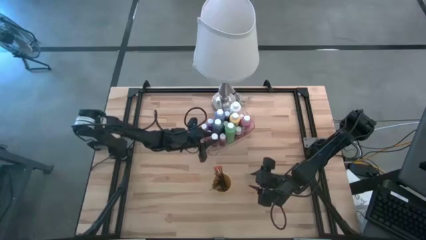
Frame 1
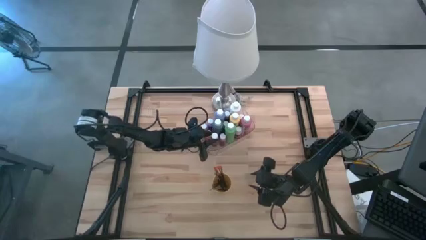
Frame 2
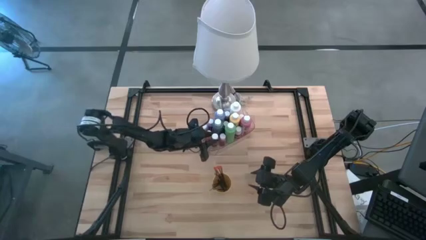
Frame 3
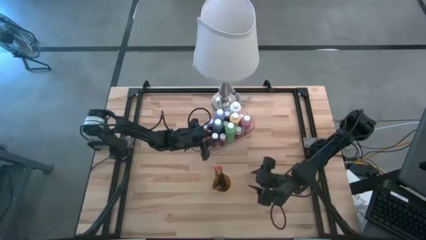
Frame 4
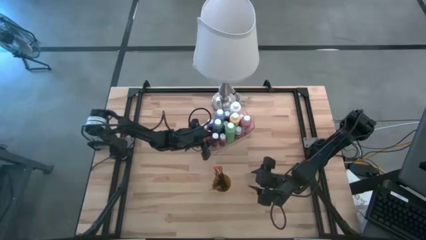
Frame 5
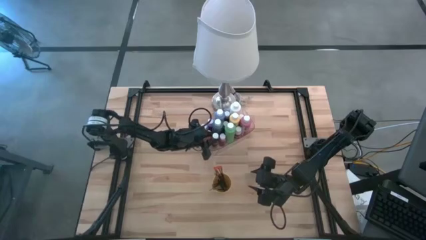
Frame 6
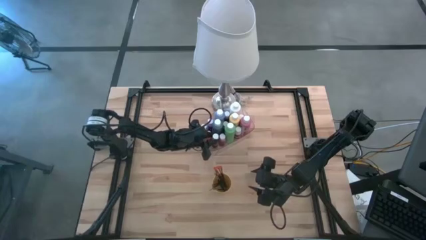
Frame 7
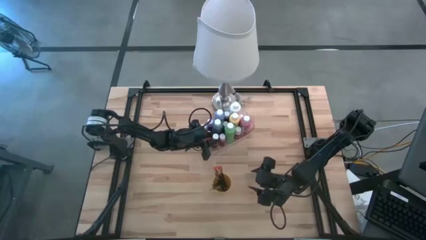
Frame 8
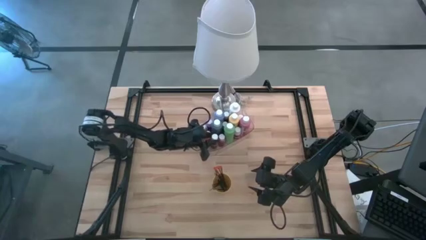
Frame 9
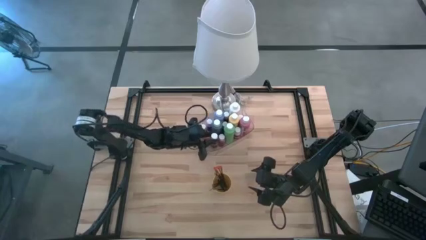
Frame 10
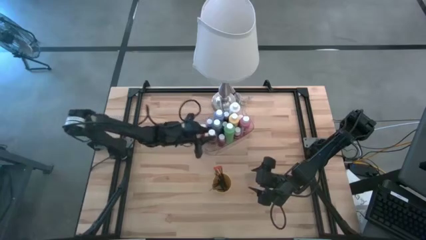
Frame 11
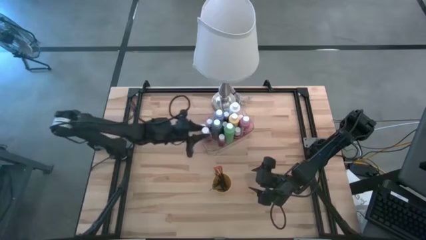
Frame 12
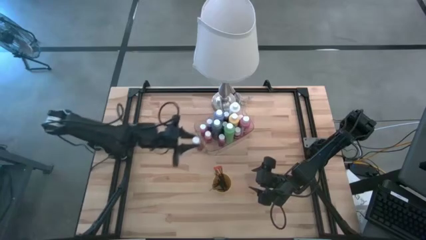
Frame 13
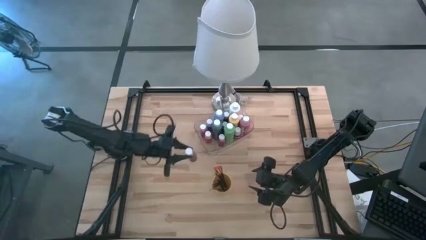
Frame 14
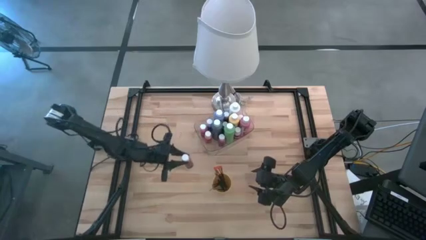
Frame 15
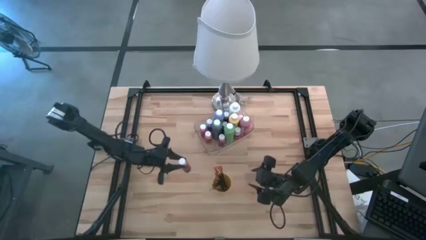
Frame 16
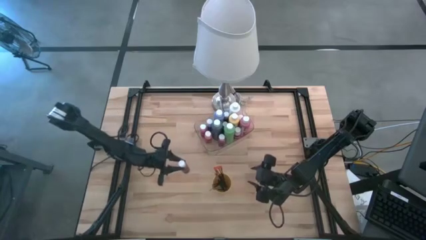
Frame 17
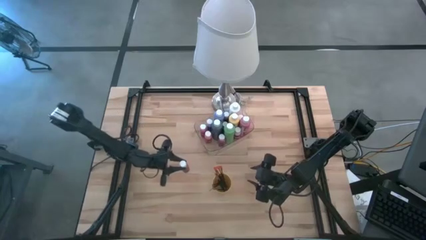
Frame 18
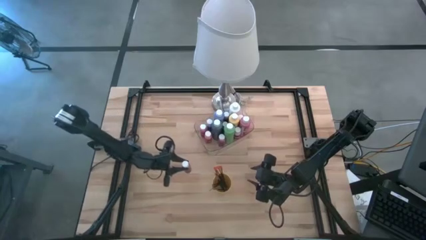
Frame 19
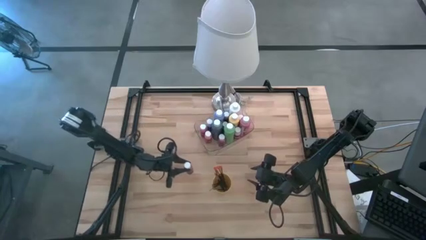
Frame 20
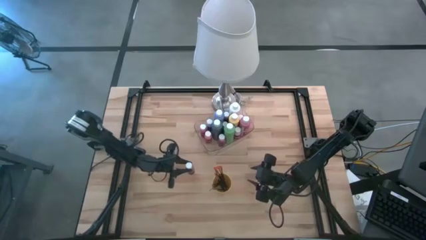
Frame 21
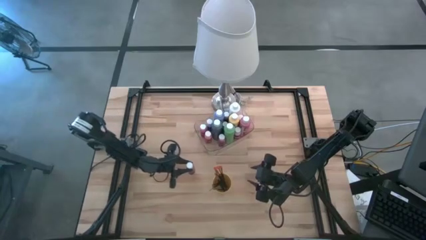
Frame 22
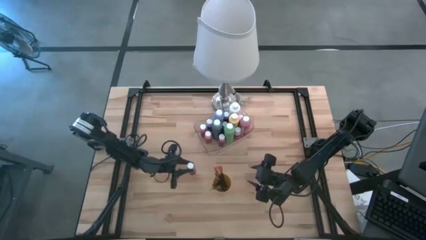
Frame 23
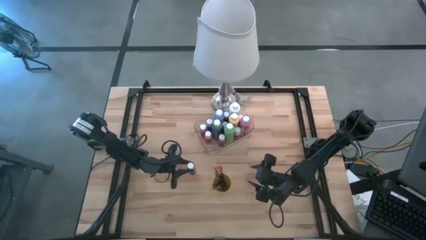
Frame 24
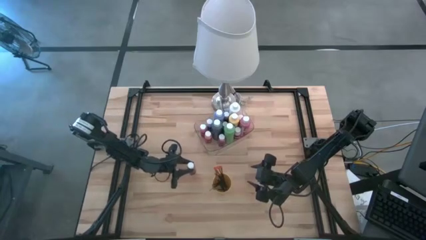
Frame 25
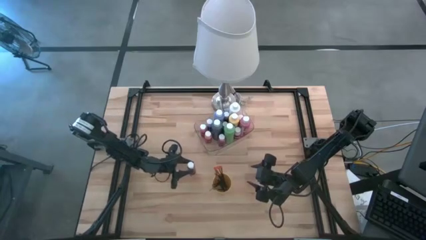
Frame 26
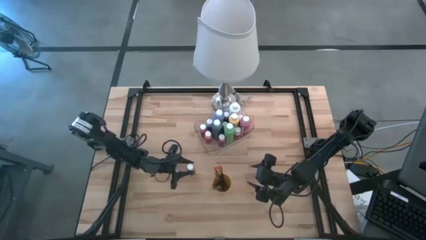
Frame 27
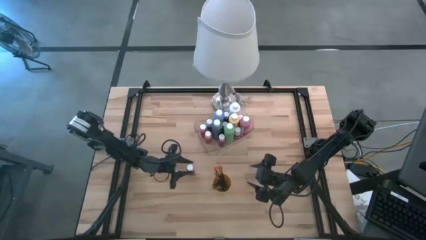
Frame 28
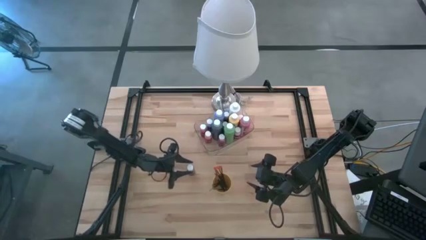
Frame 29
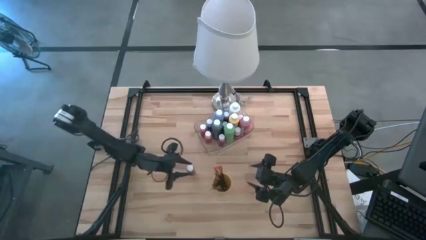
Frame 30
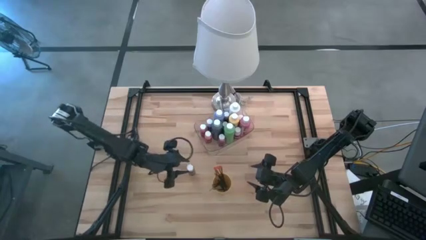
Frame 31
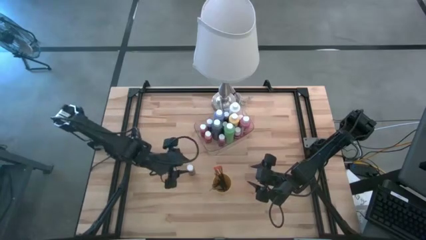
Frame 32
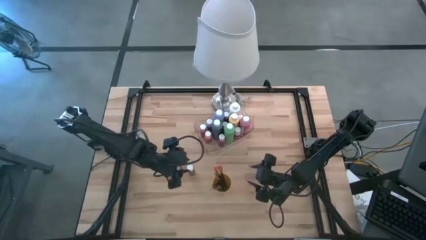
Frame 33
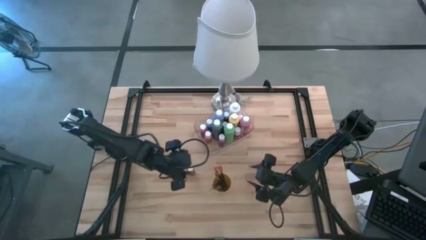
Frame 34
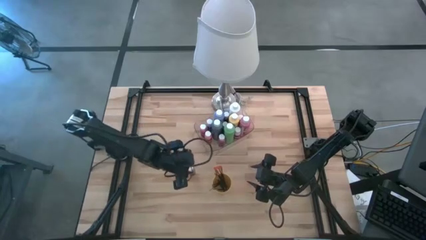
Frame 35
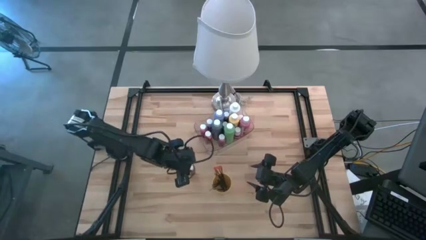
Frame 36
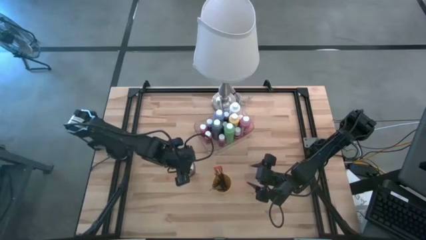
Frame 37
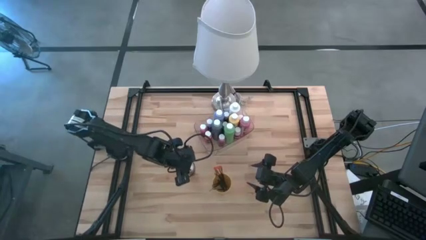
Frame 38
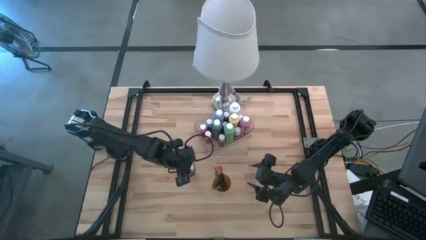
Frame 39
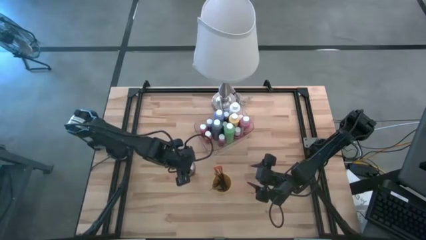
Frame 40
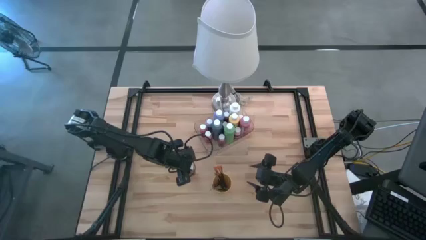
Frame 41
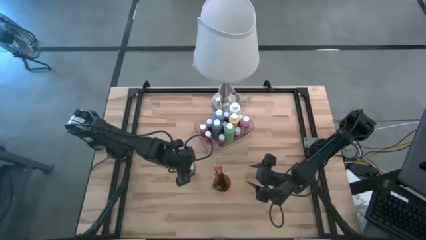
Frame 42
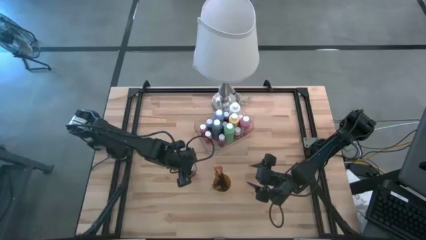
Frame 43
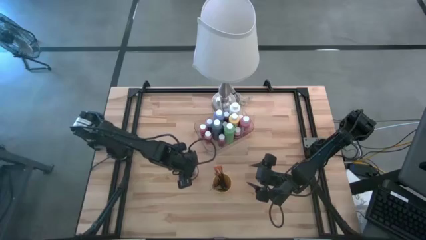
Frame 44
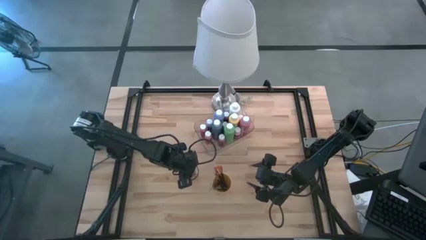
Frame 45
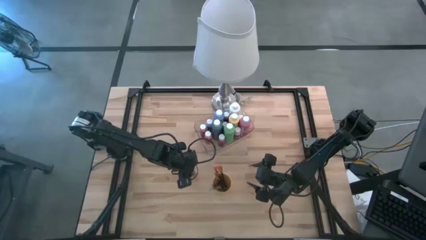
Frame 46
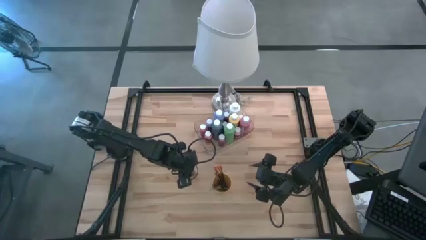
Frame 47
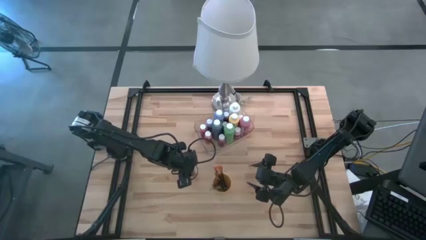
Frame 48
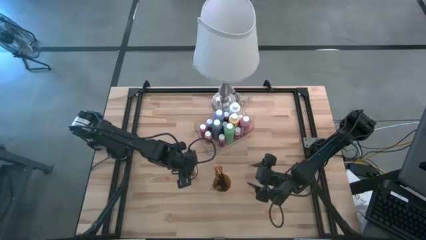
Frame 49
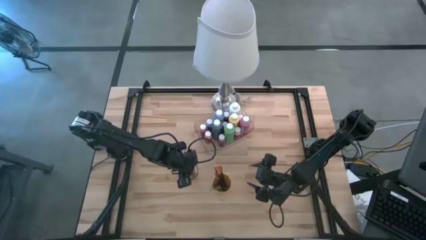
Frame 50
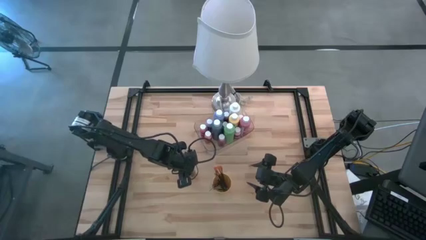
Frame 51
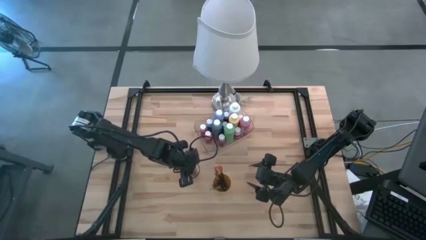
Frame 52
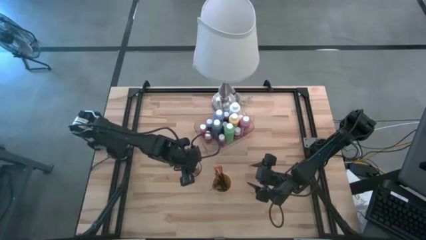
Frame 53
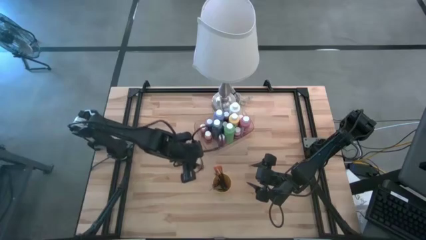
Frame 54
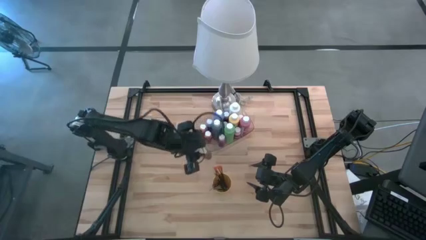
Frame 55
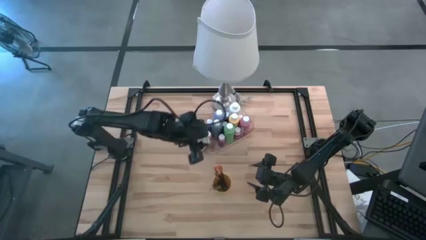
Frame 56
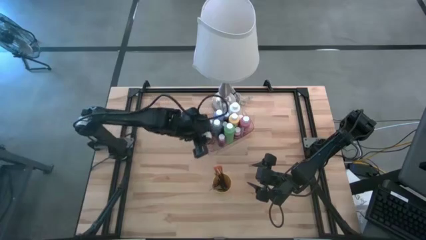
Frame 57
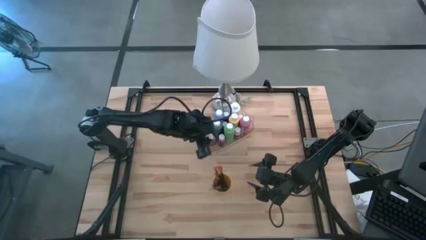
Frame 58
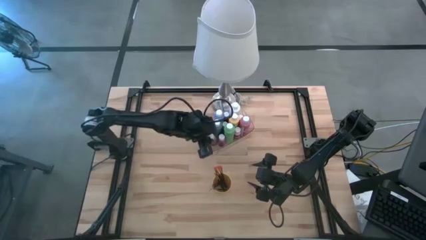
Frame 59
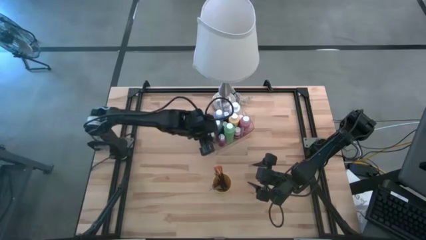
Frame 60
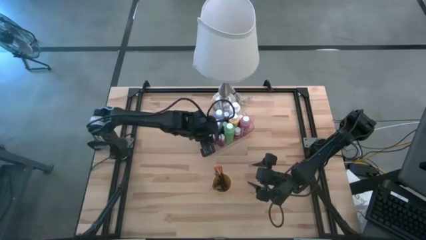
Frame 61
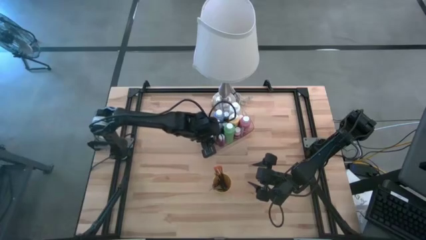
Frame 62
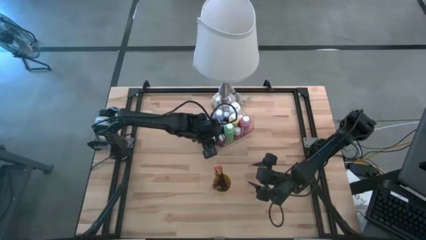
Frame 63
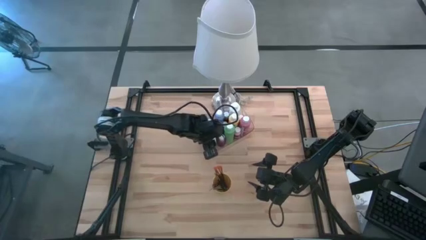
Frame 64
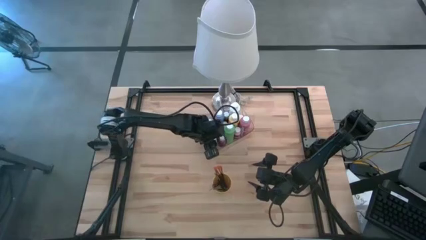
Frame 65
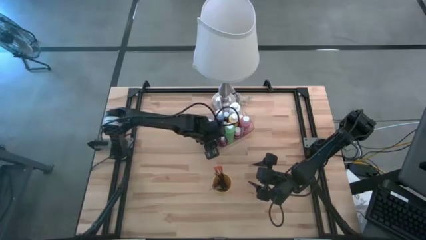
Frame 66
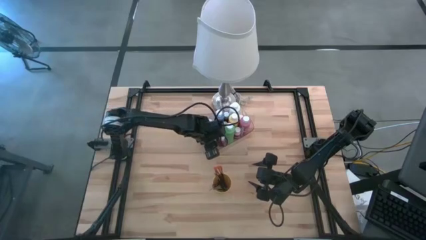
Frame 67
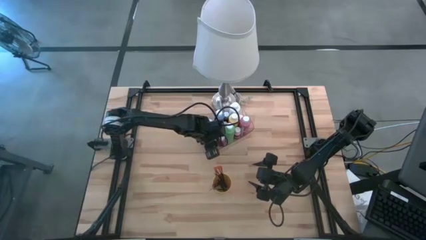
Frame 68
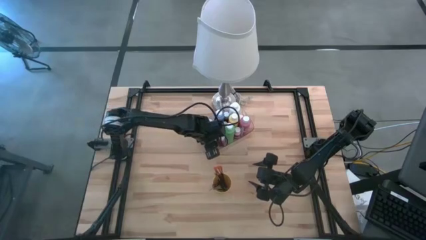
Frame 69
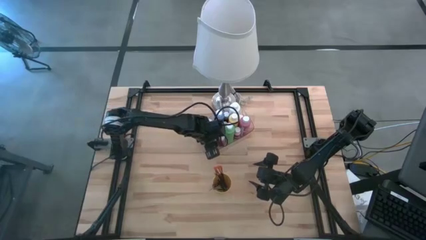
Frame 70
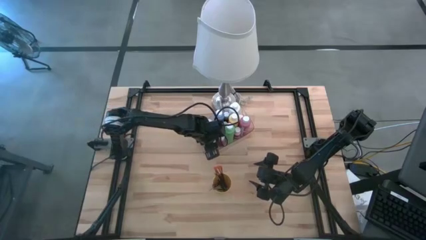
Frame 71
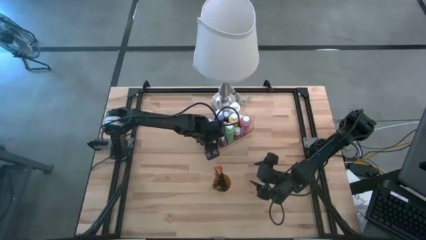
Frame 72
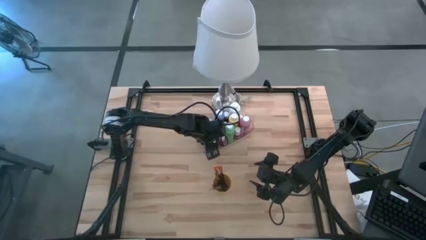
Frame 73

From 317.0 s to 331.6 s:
Task: Pick & Place Paint Supplies
Put the brown bottle into the transparent bin
